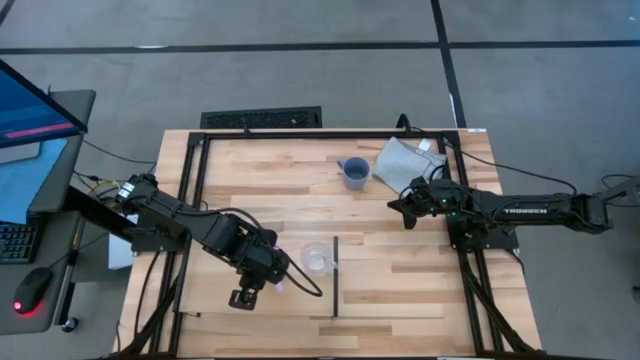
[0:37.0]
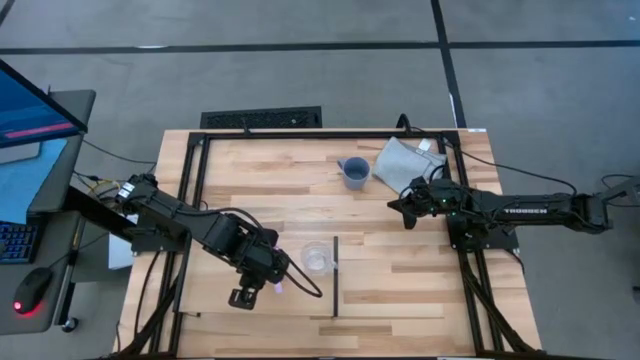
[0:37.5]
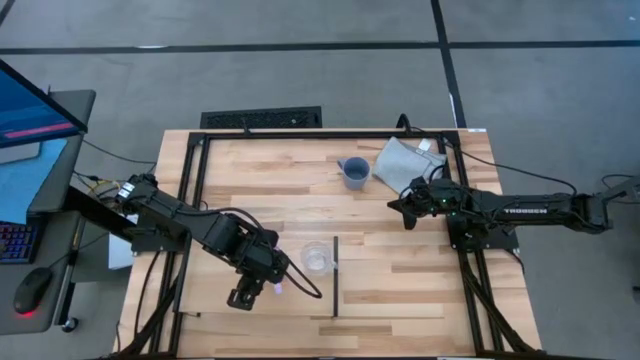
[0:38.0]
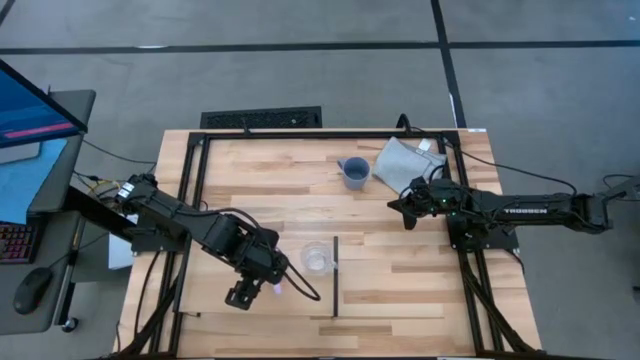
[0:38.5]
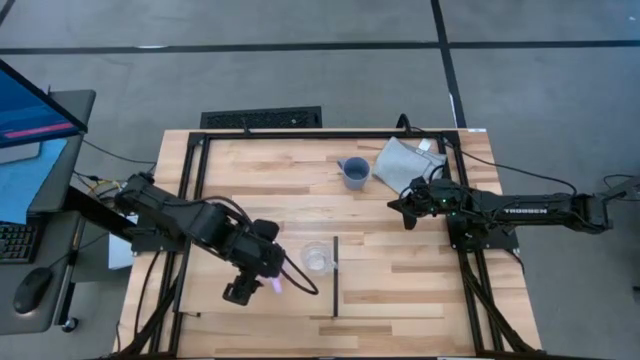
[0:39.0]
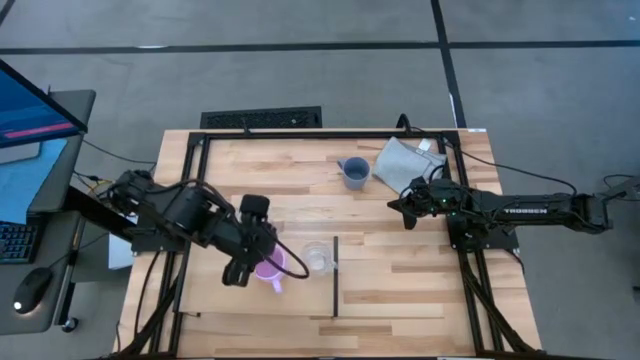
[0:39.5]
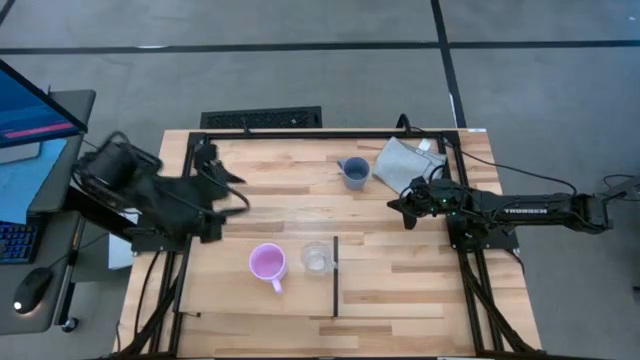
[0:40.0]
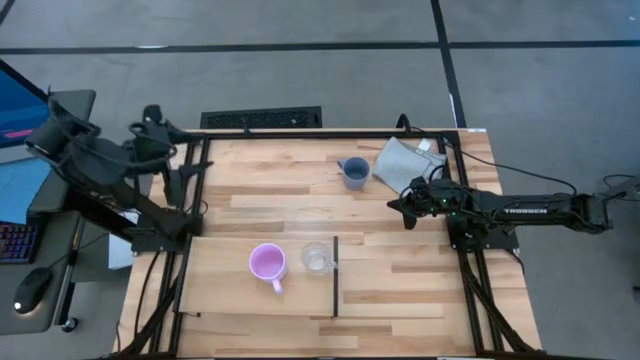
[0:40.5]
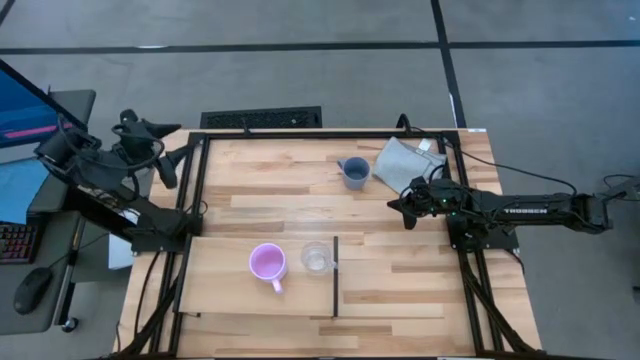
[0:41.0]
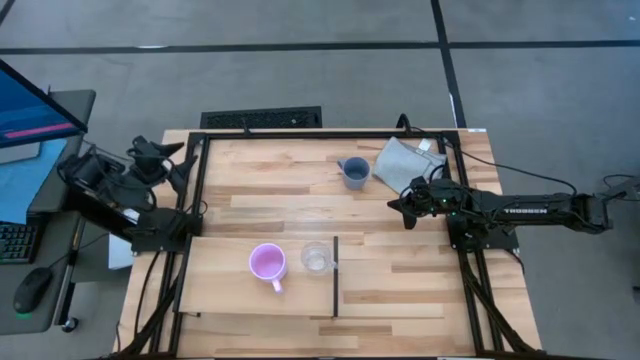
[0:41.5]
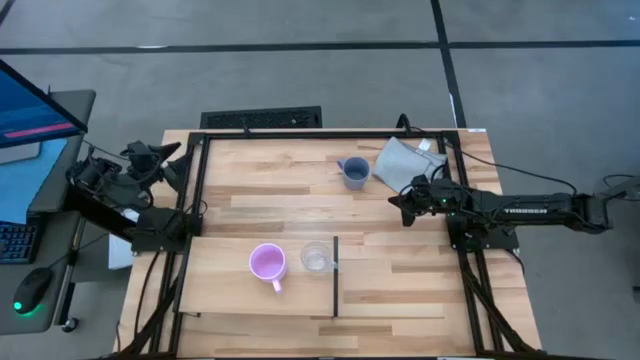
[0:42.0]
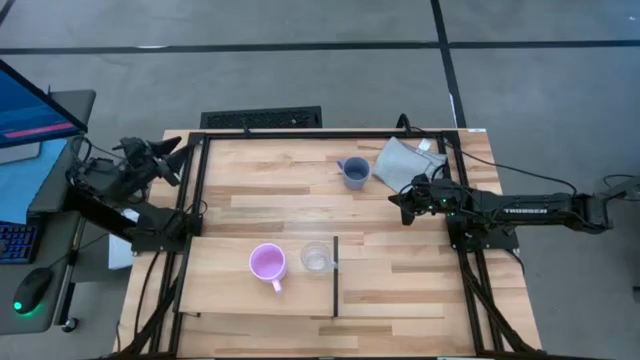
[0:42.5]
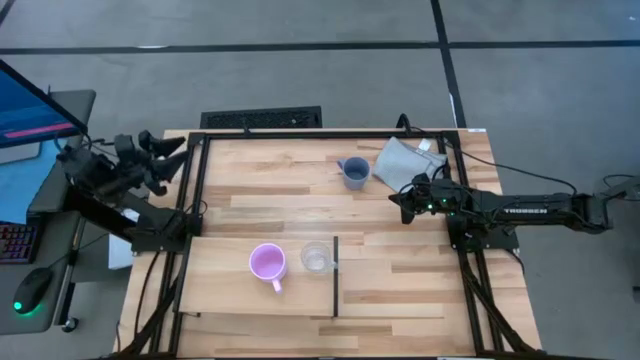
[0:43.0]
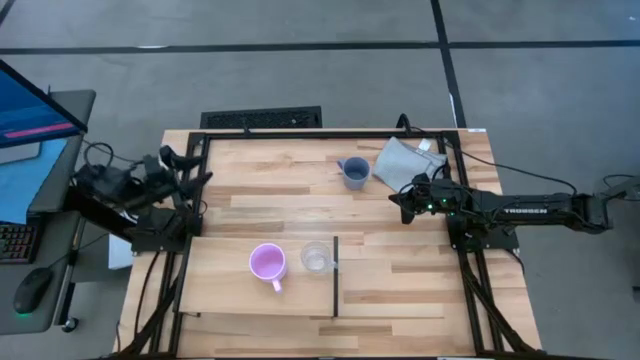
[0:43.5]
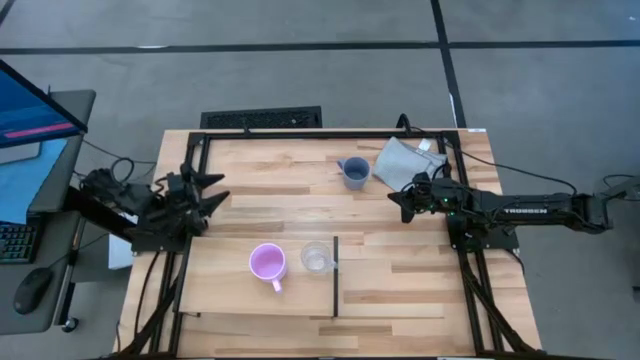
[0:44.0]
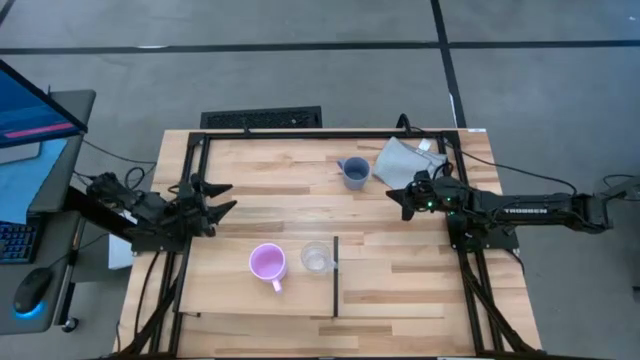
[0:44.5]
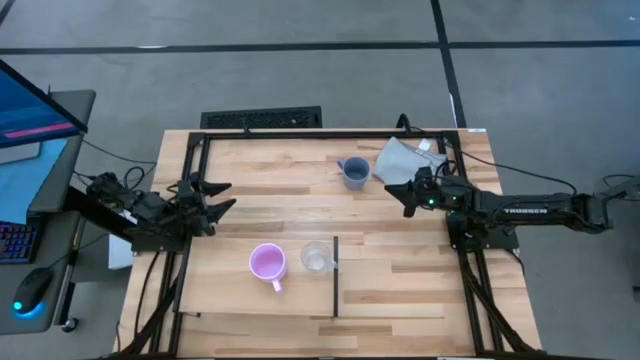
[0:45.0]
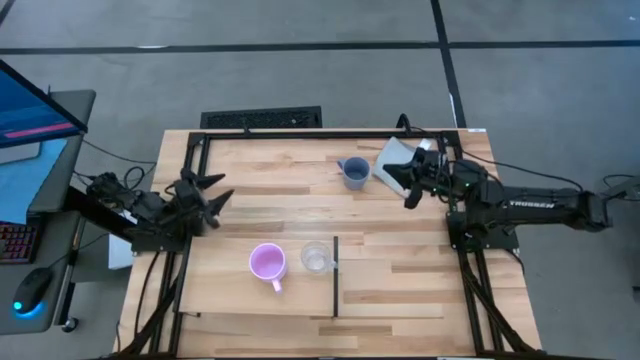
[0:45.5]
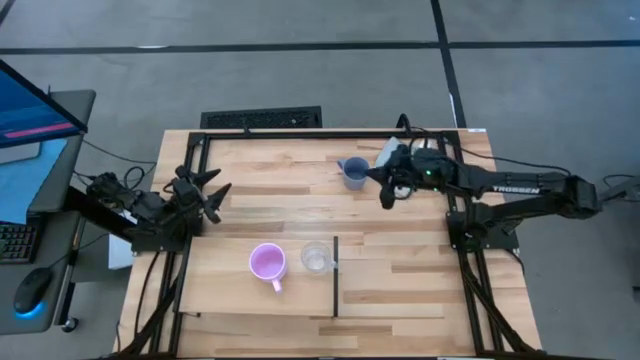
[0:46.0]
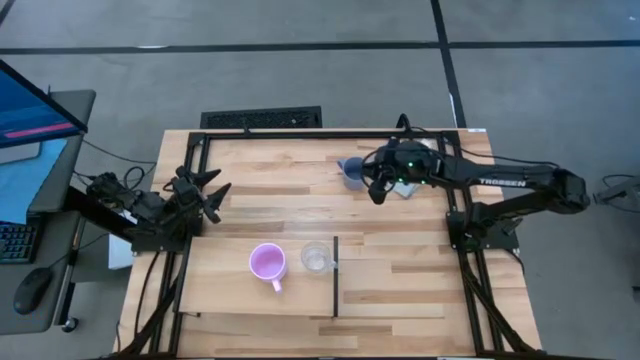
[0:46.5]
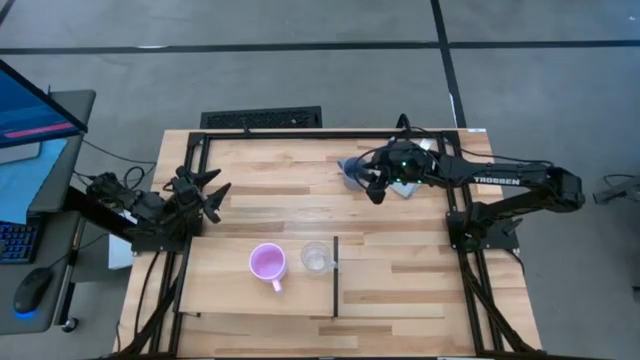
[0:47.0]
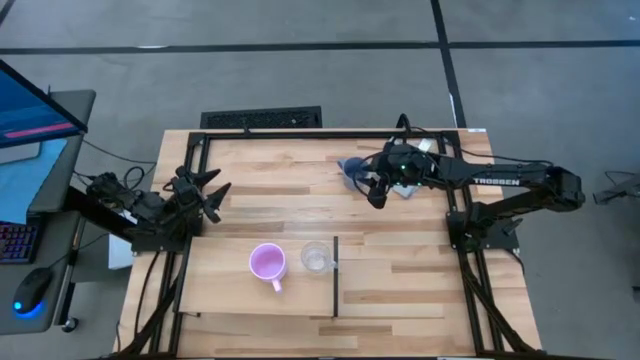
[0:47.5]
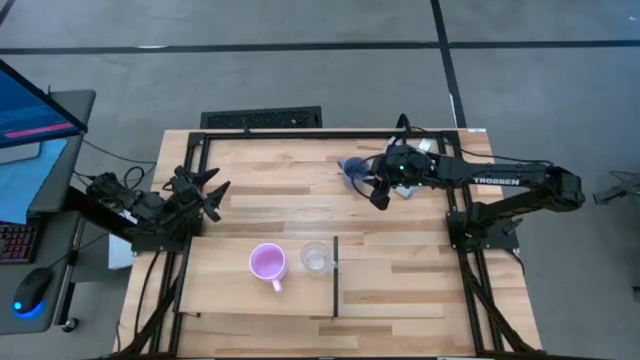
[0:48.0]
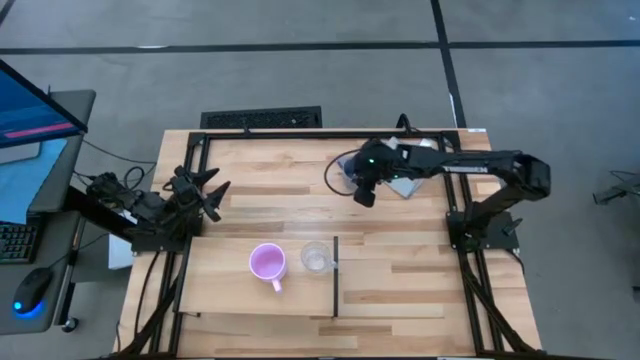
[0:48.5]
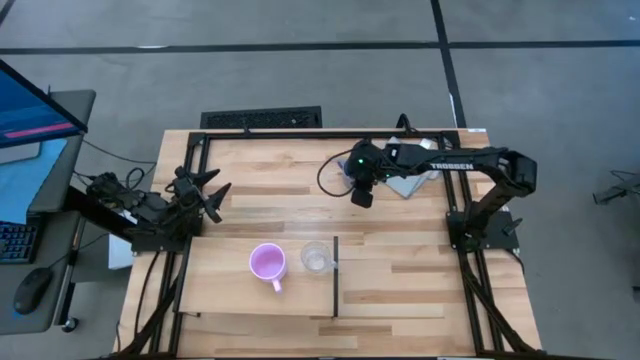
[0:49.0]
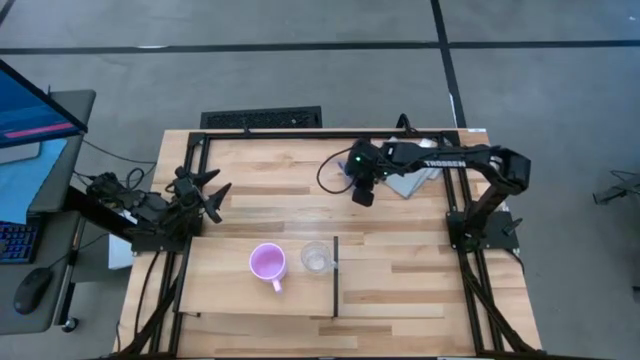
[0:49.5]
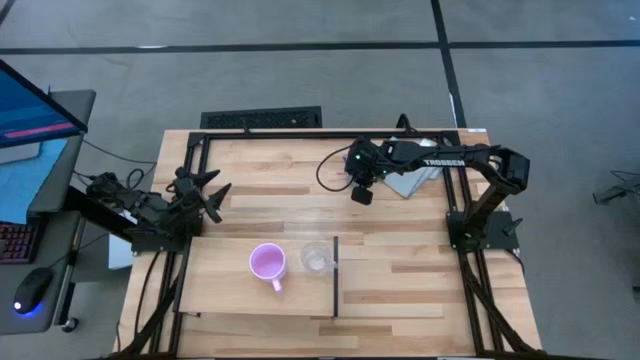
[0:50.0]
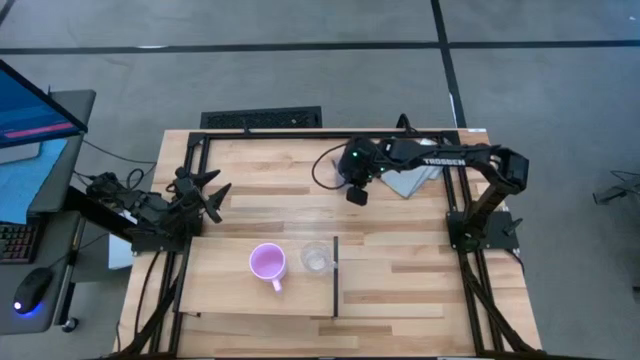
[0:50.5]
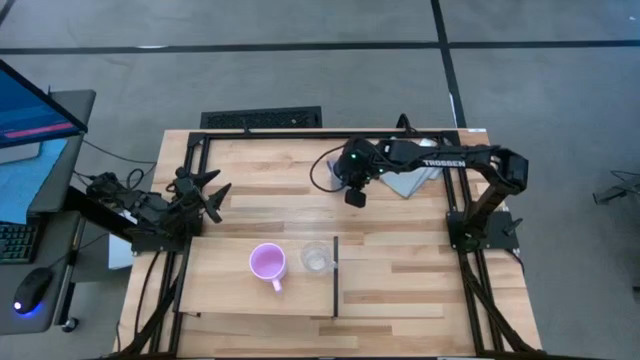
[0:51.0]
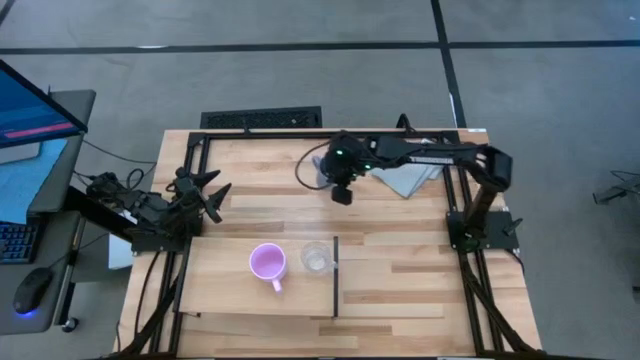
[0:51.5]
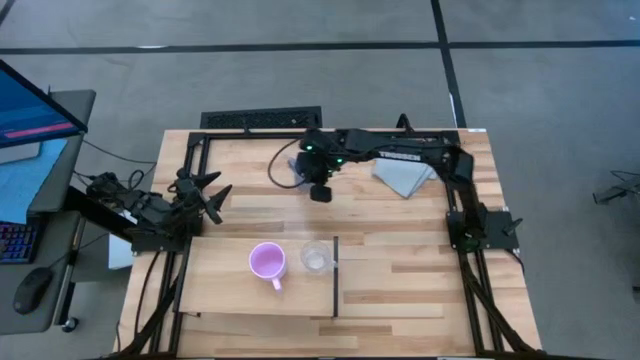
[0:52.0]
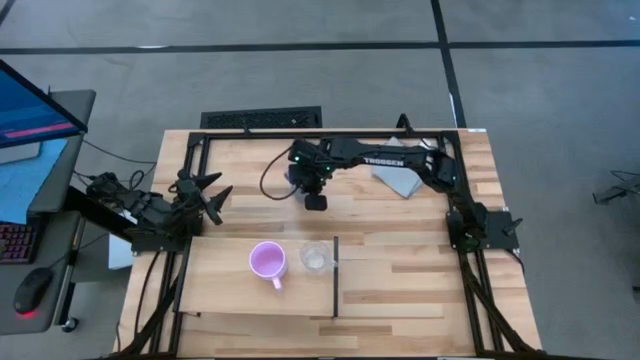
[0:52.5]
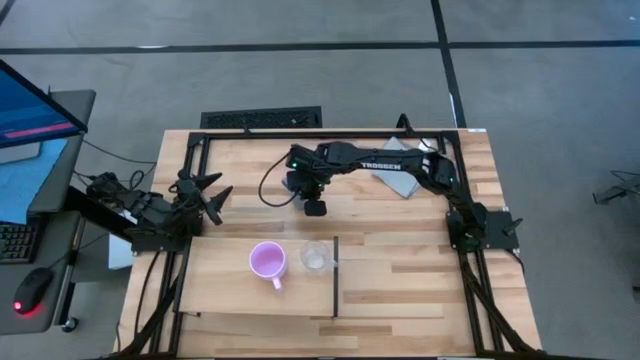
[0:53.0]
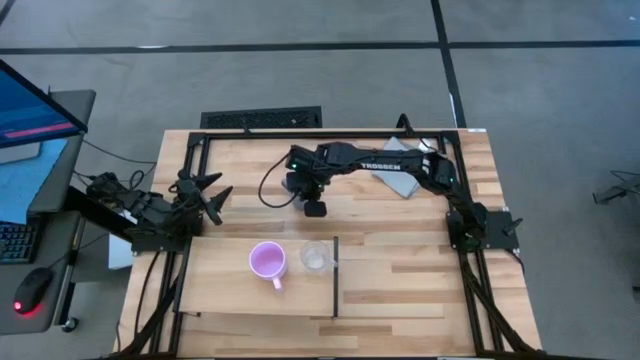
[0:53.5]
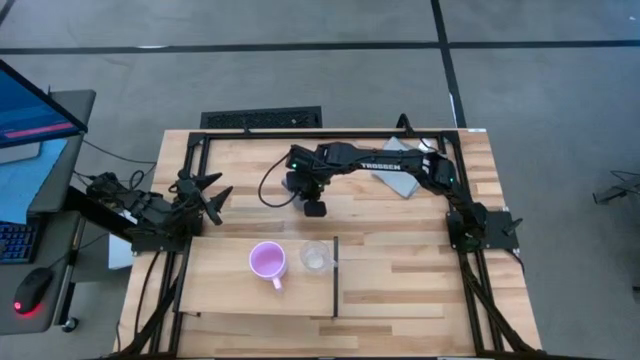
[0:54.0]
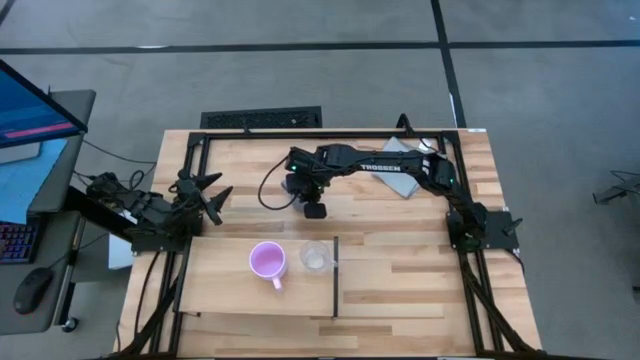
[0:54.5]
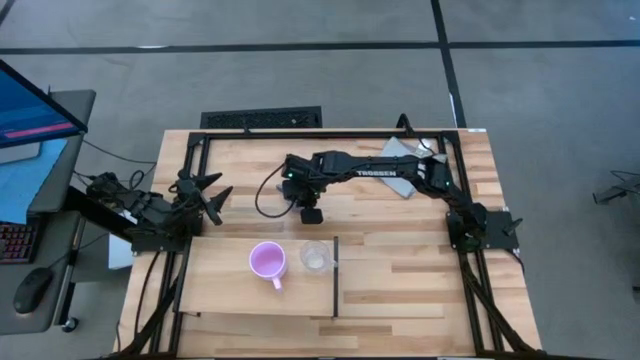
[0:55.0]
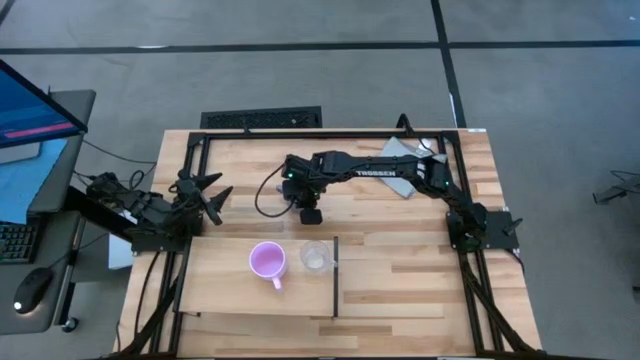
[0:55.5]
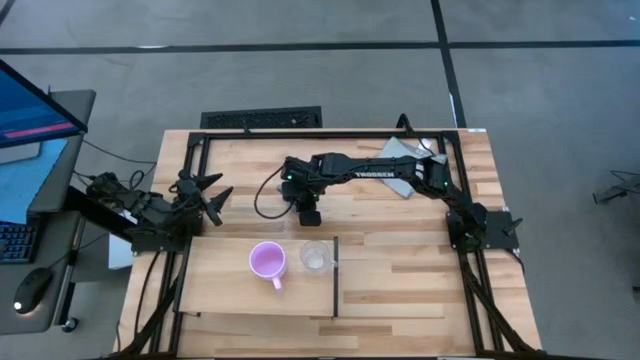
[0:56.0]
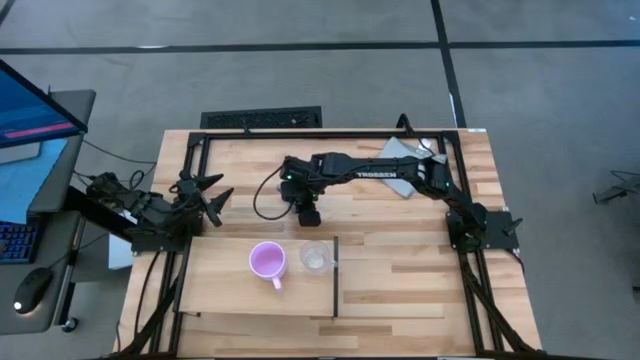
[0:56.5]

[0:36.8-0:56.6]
Task: Stack small to large cups/mugs on shelf
Put the gray mug on the shelf
